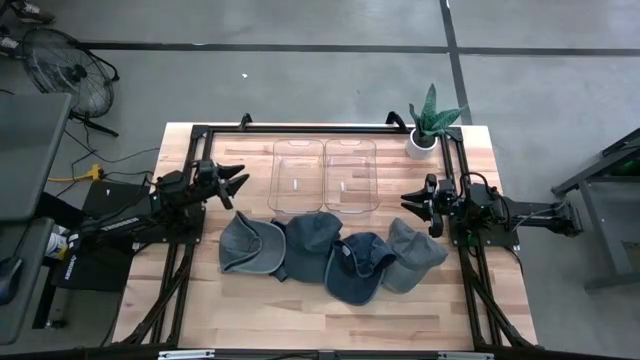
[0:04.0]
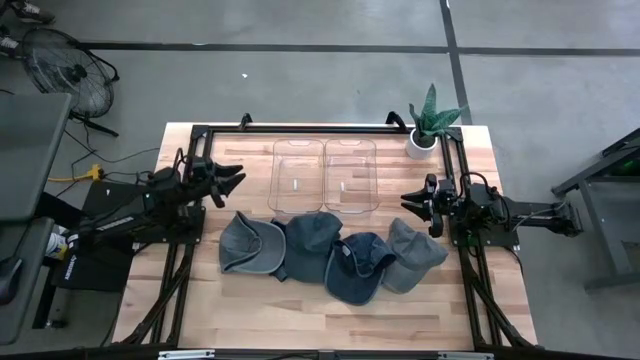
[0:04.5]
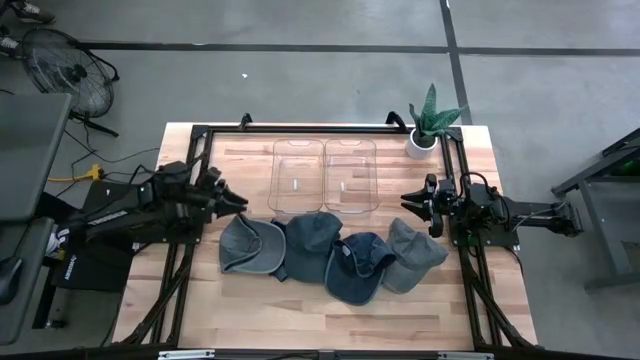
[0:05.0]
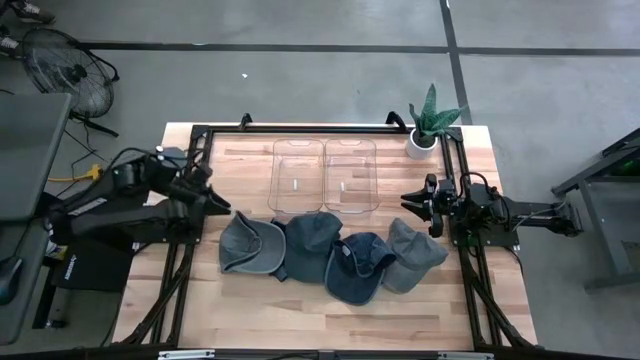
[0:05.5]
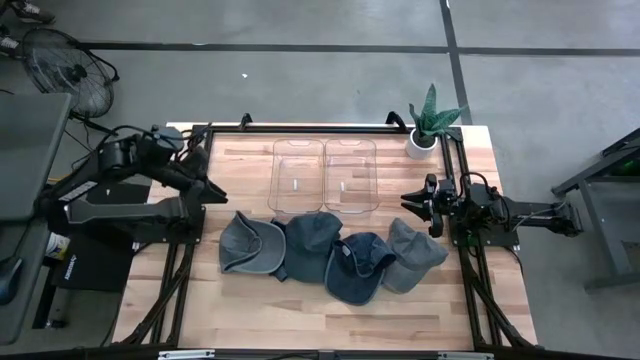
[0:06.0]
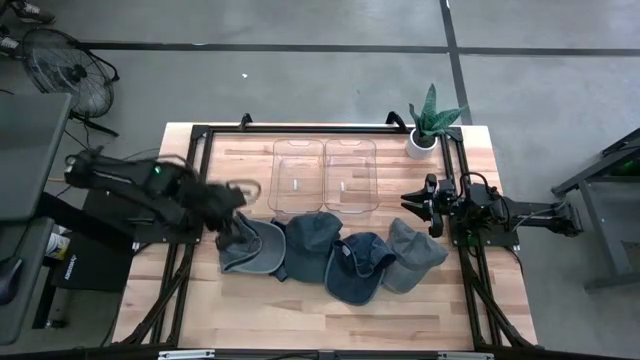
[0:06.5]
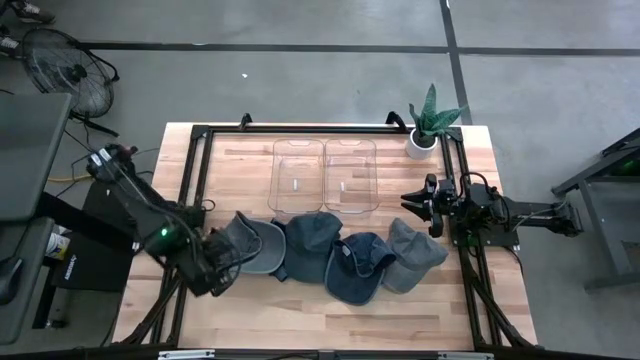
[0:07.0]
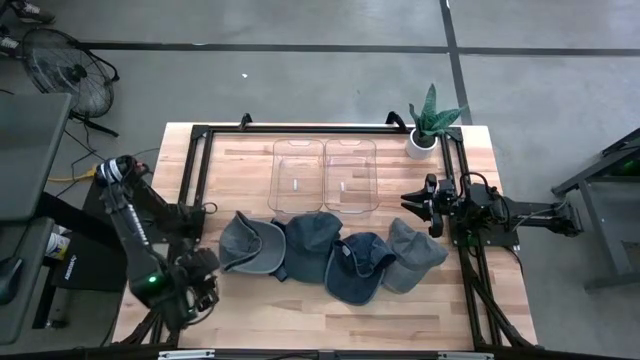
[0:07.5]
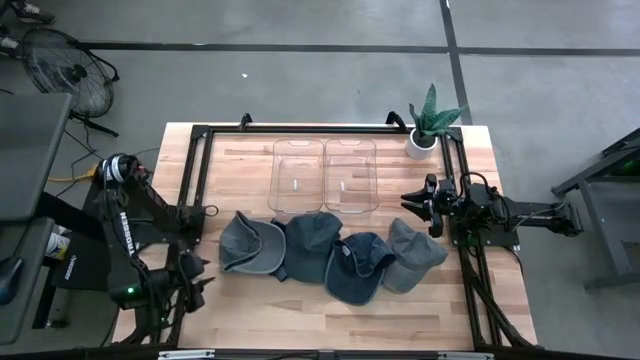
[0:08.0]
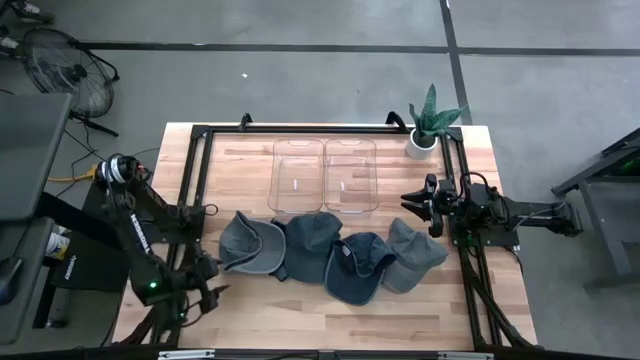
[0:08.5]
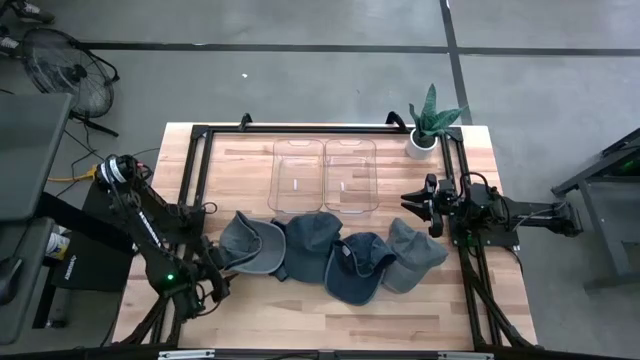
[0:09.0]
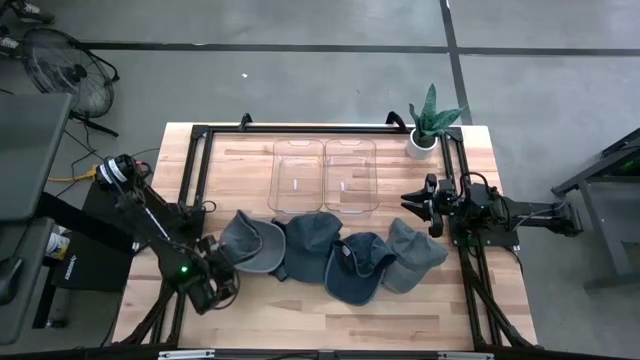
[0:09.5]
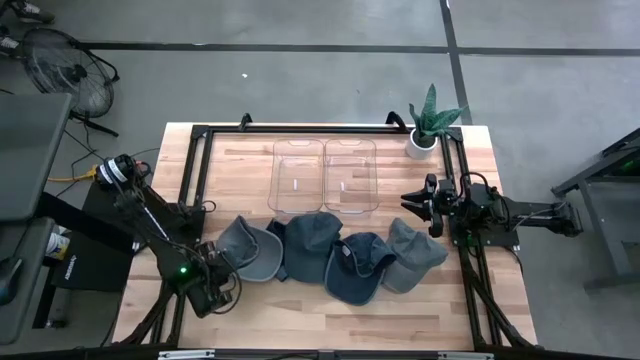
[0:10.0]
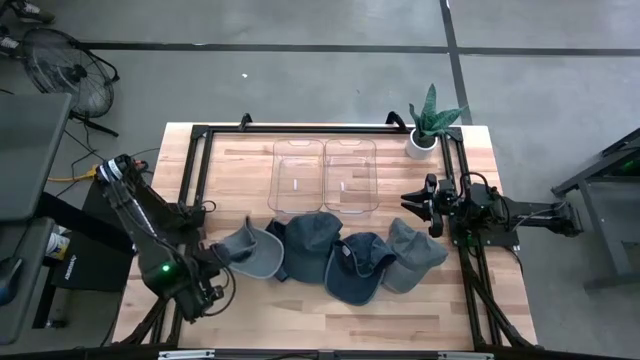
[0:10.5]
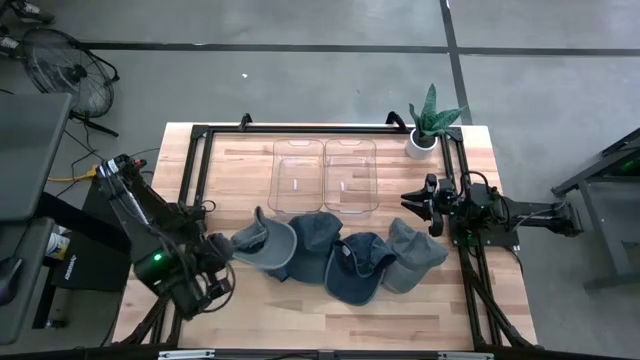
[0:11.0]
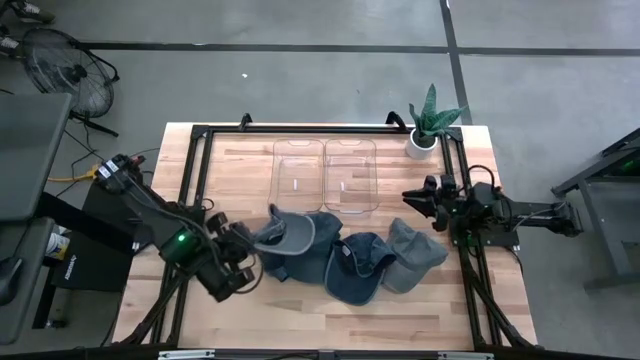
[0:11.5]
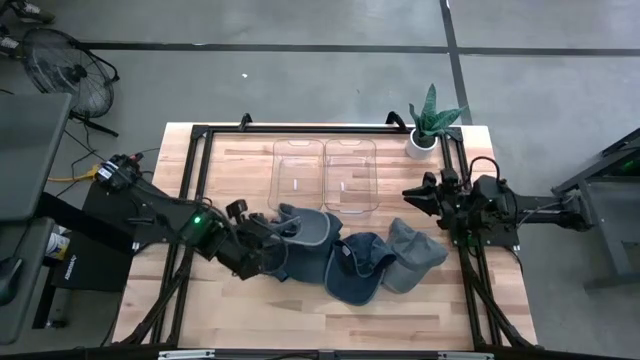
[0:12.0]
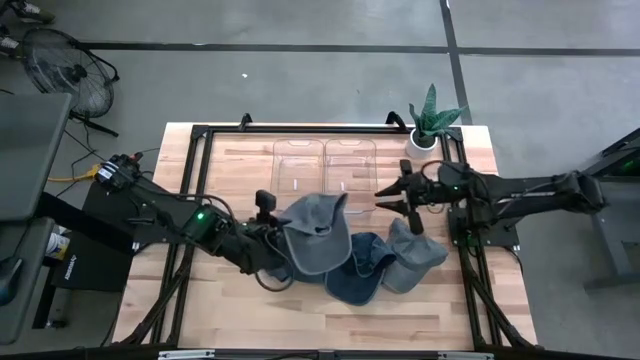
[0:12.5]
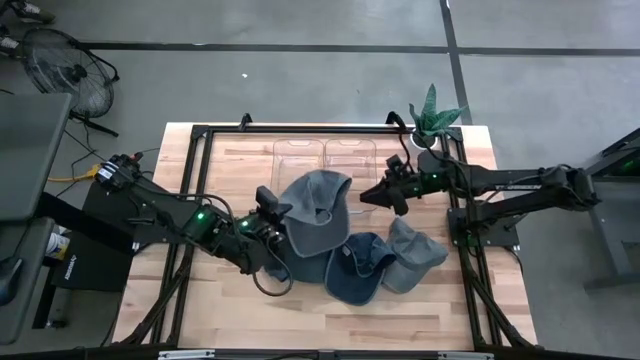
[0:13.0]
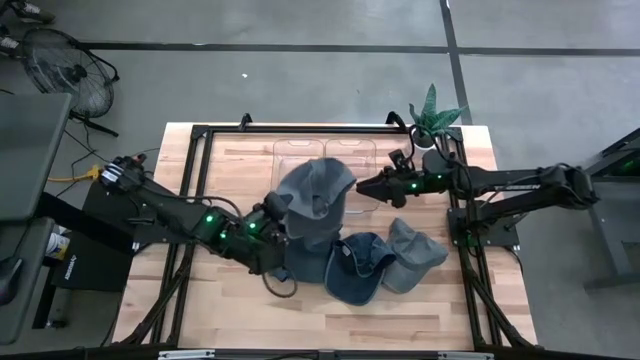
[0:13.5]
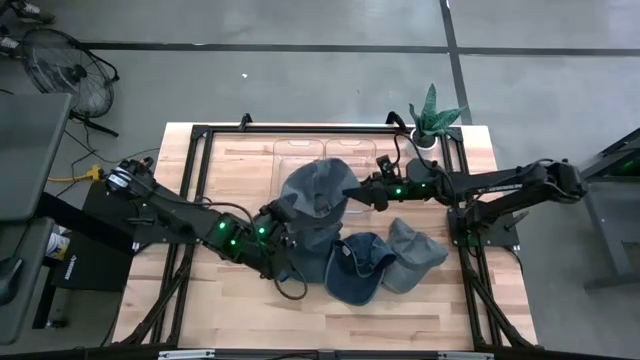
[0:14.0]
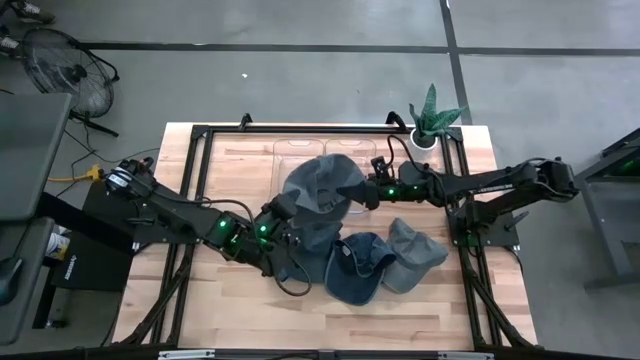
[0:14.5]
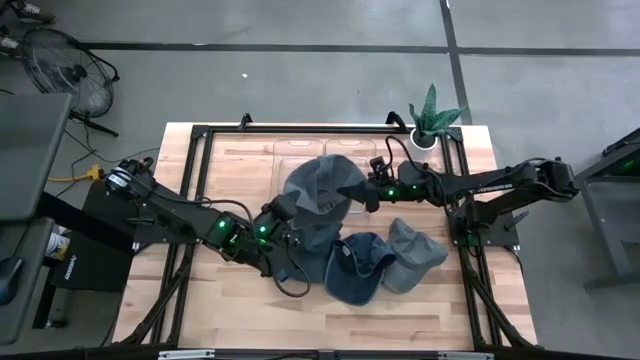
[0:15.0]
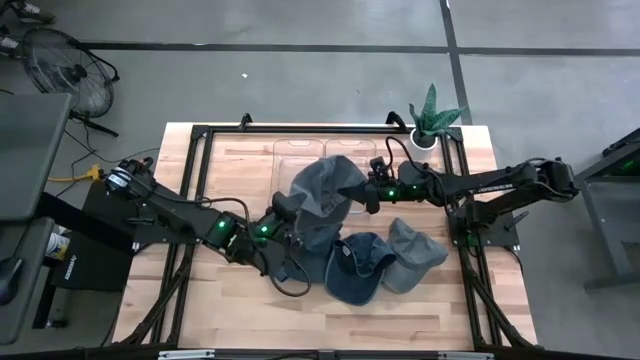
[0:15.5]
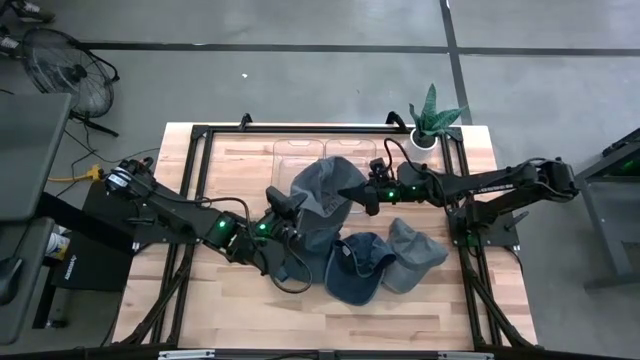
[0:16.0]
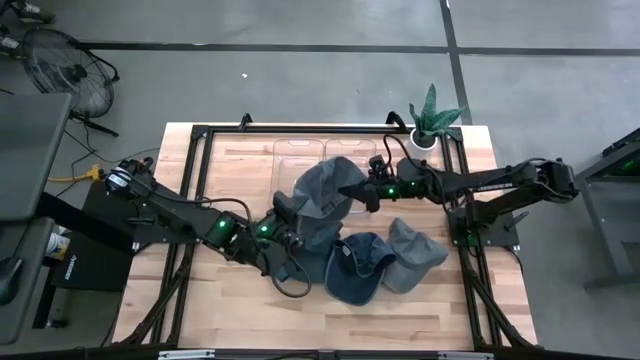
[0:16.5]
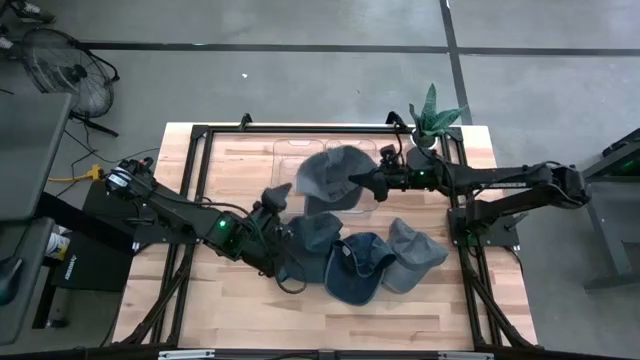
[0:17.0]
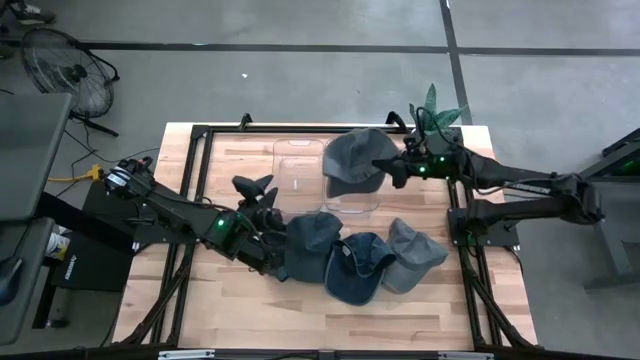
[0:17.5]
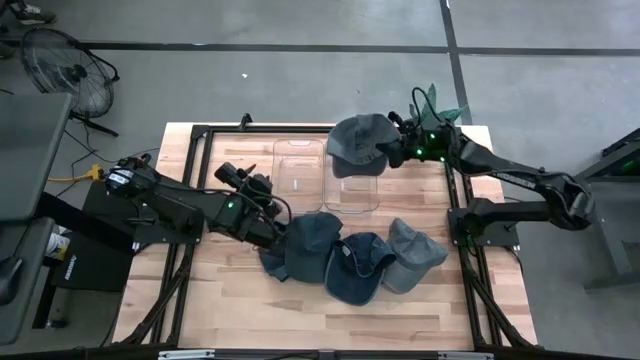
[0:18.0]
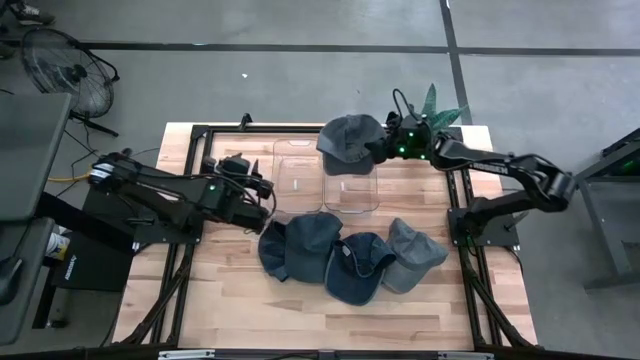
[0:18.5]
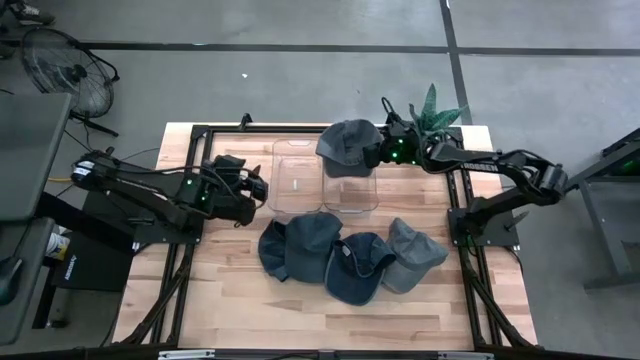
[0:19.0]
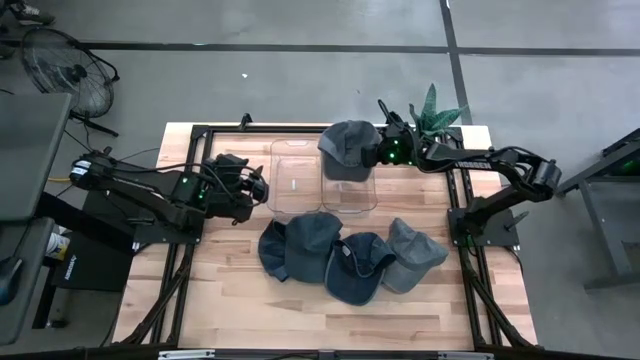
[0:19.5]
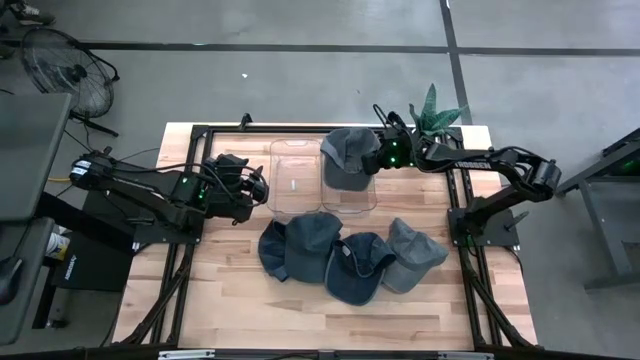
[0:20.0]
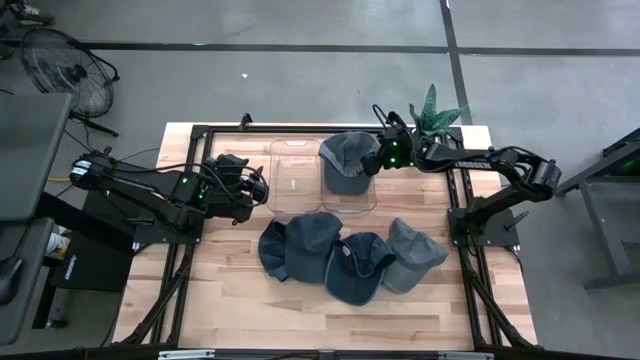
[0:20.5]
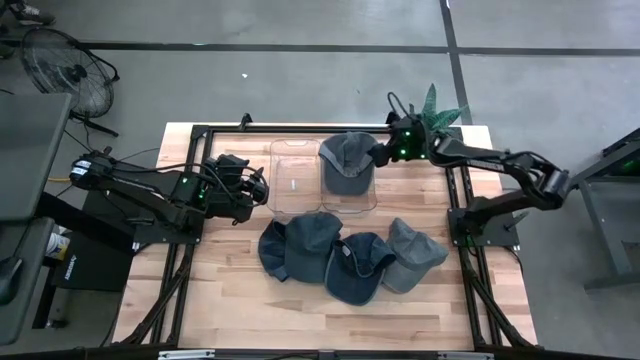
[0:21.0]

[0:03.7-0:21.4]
Task: Pick & Place hat
Put the left gray cap into the right transparent bin
